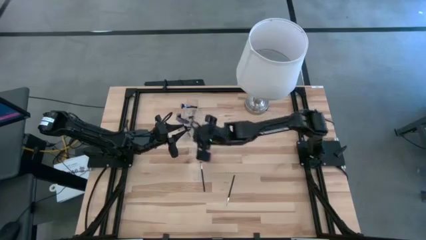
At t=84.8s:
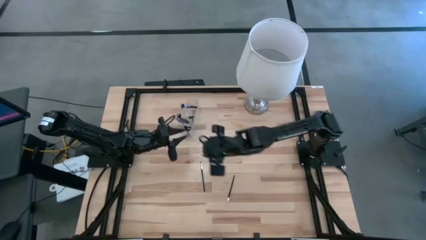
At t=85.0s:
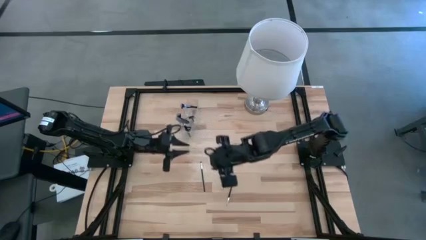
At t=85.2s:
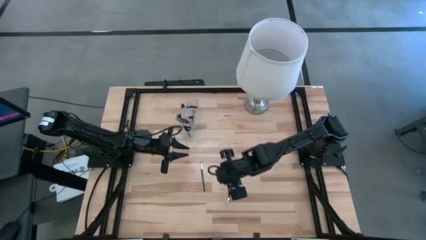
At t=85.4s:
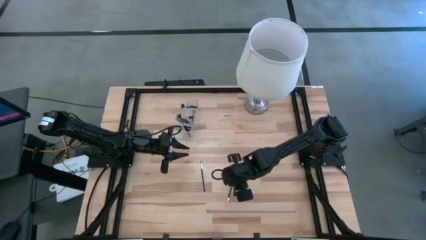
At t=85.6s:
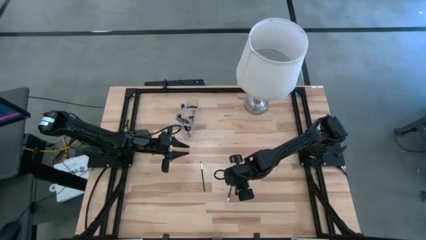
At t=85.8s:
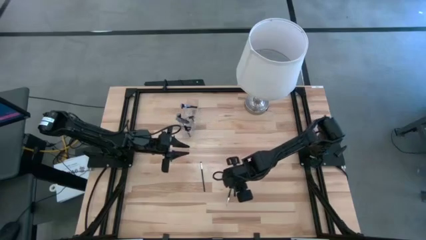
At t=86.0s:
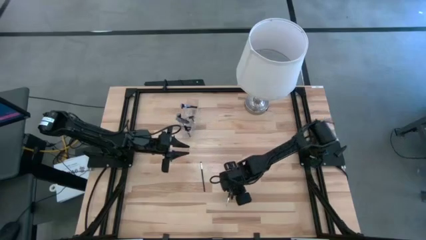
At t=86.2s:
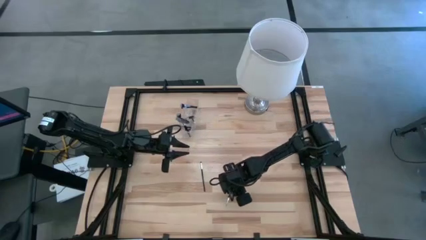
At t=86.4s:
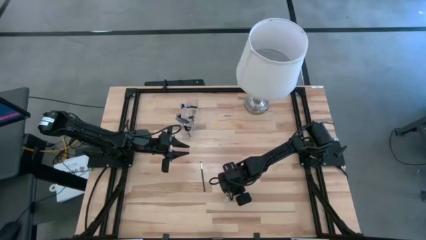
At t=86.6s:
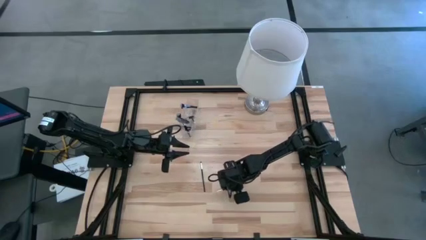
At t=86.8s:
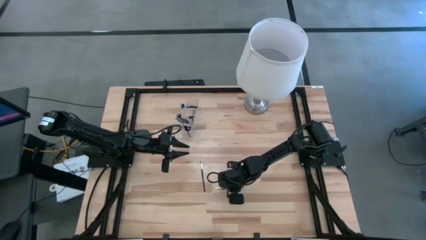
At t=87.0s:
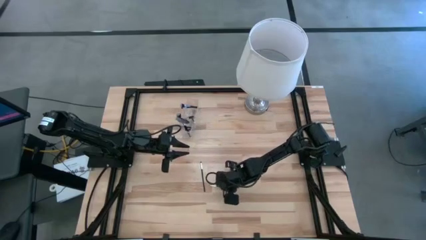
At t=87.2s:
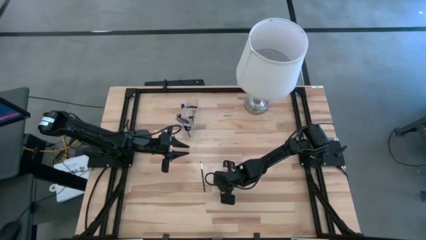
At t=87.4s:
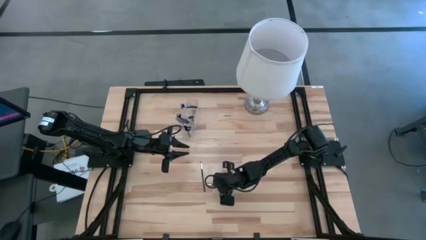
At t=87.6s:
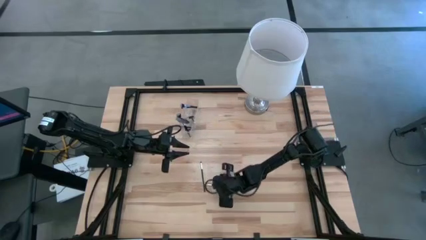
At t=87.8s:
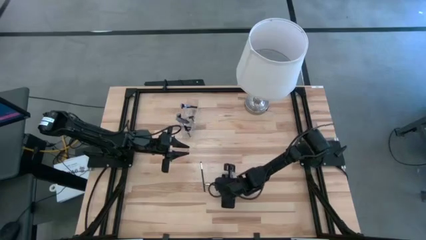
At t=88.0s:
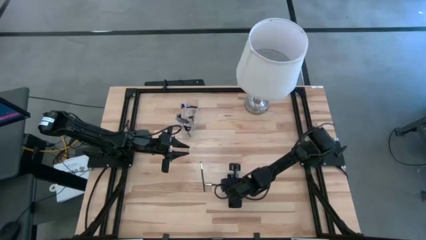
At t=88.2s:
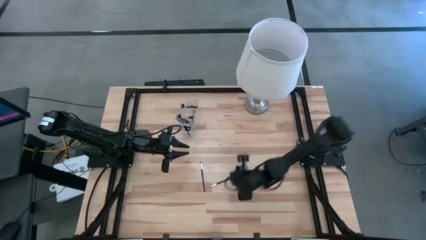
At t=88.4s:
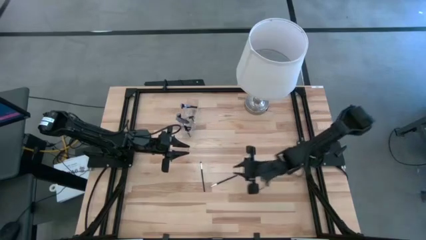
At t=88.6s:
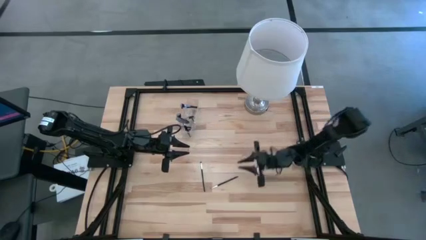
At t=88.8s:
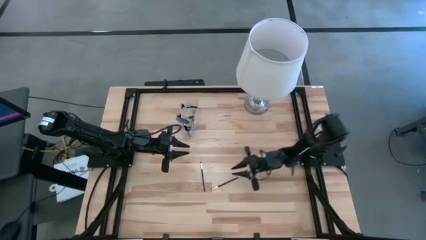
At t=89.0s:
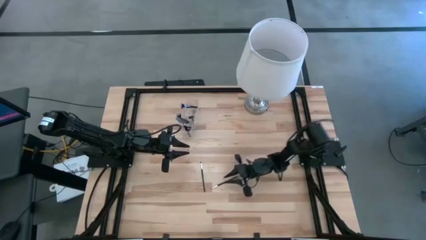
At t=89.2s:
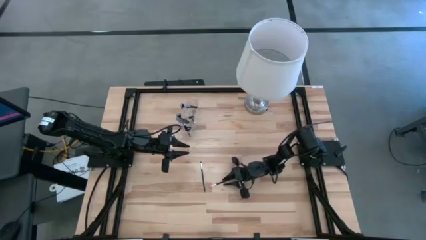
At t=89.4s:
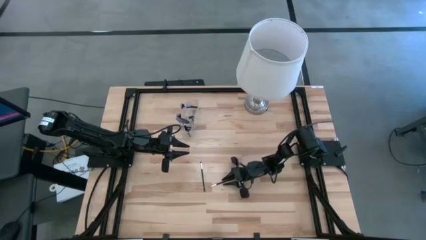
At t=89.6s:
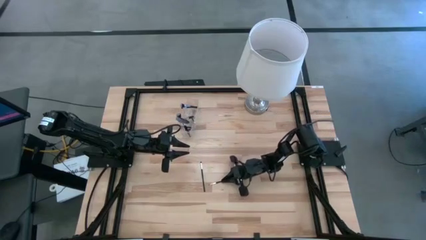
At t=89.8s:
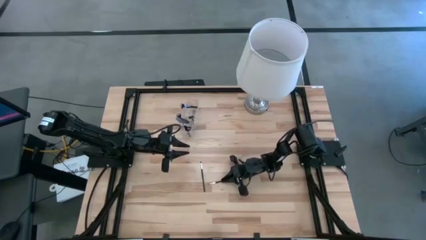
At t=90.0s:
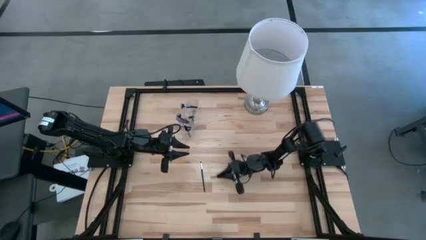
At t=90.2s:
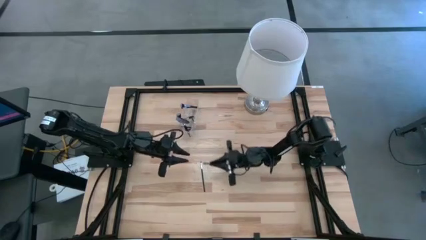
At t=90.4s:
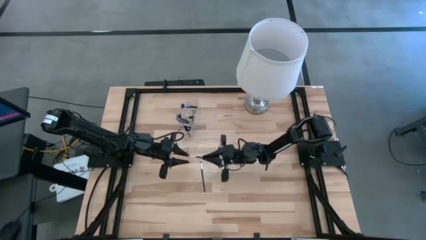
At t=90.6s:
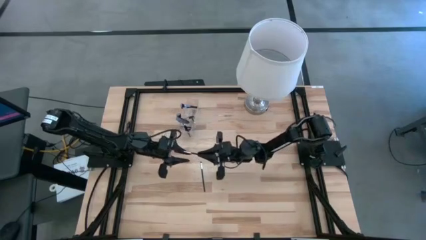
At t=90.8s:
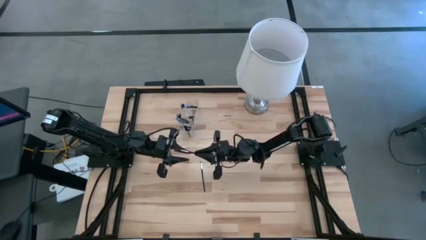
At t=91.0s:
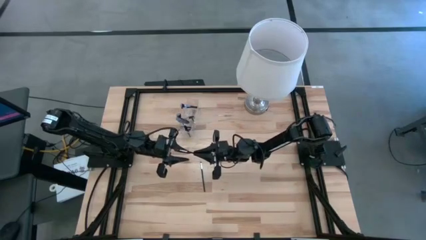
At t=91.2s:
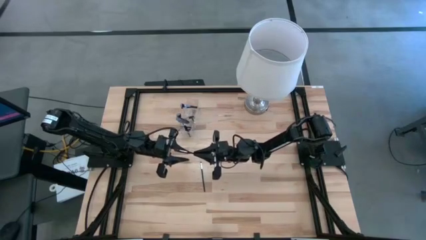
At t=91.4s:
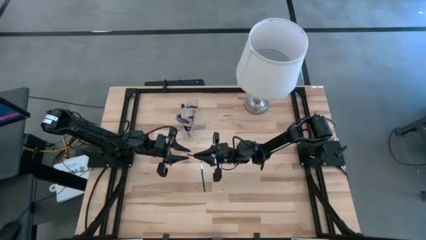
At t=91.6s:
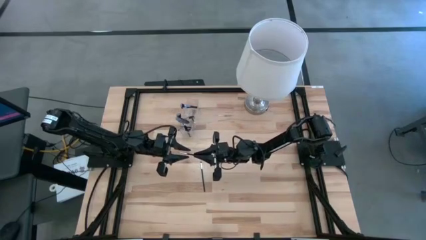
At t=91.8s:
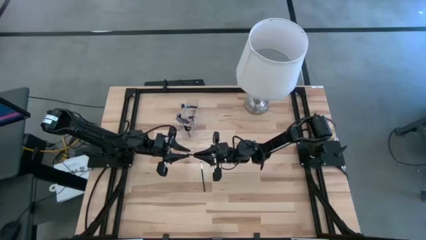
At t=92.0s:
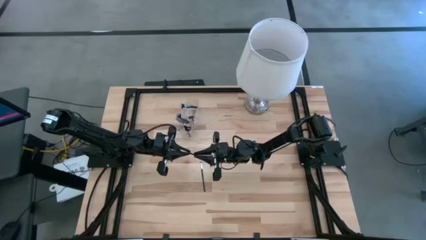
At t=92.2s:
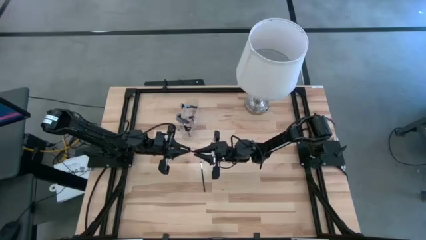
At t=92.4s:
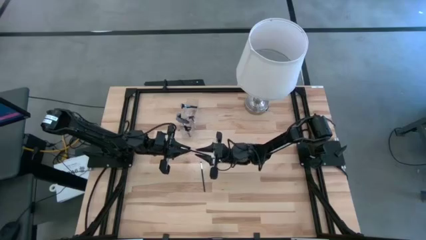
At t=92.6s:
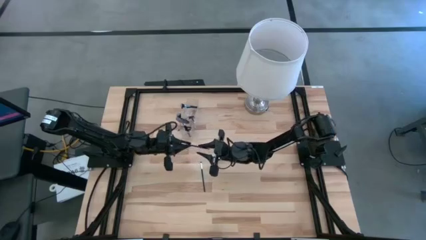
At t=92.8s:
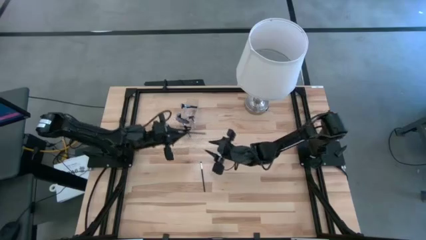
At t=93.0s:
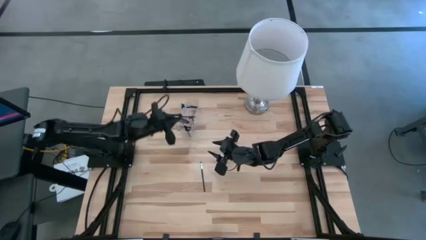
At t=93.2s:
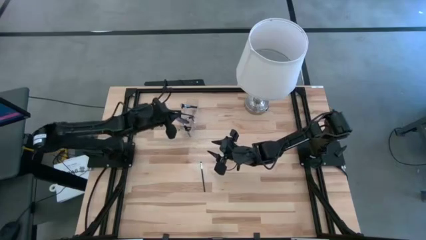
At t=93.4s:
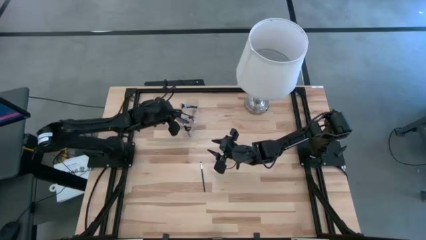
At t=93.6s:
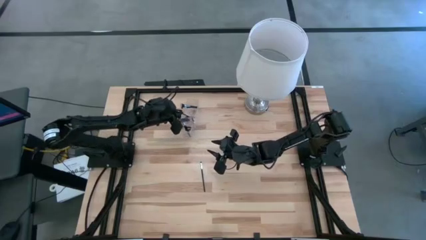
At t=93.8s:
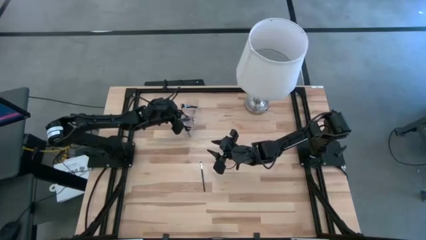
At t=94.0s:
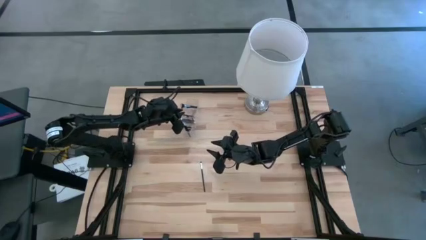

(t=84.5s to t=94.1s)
Task: Put items in baskets/containers
Put the liner brush into the center transparent organizer

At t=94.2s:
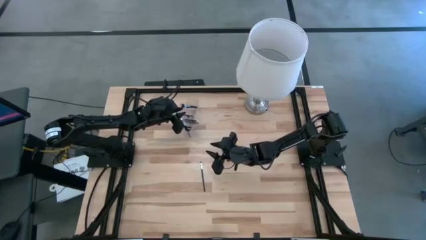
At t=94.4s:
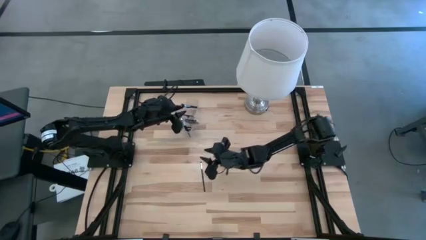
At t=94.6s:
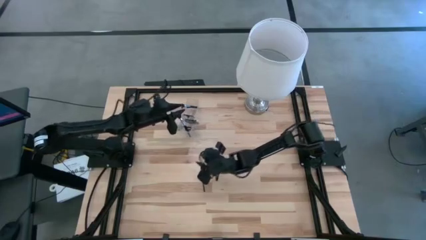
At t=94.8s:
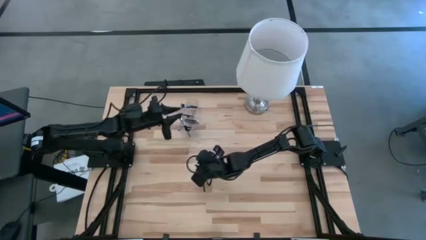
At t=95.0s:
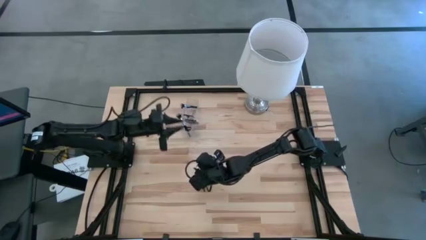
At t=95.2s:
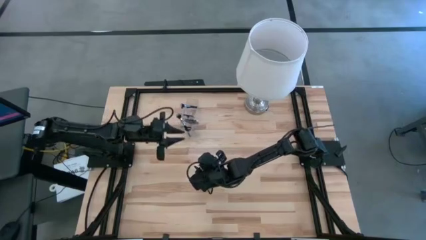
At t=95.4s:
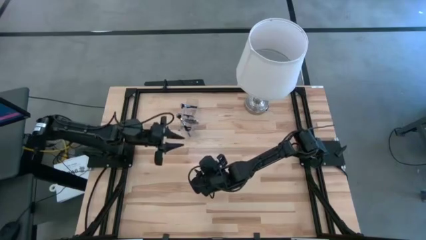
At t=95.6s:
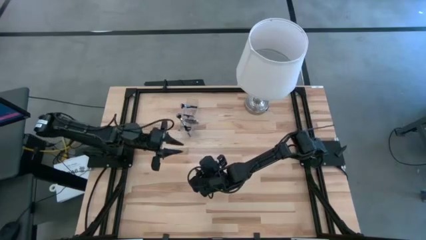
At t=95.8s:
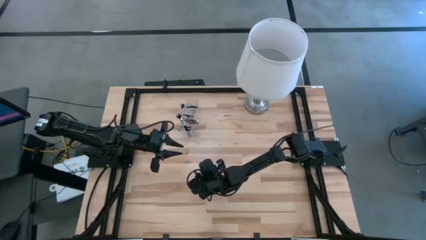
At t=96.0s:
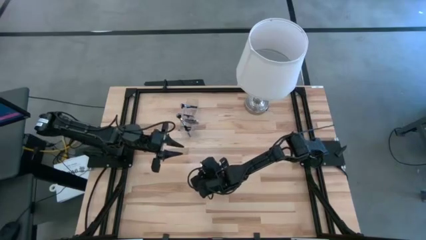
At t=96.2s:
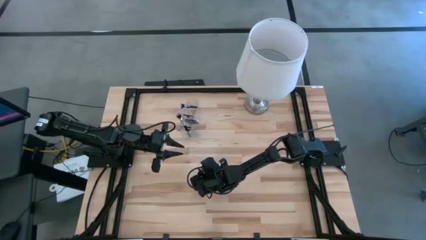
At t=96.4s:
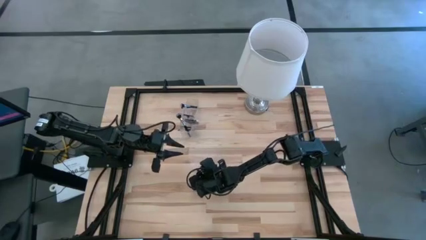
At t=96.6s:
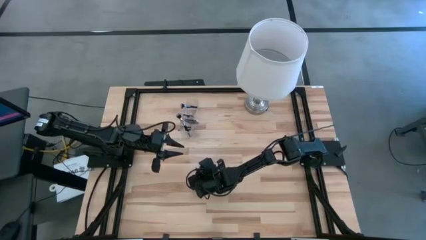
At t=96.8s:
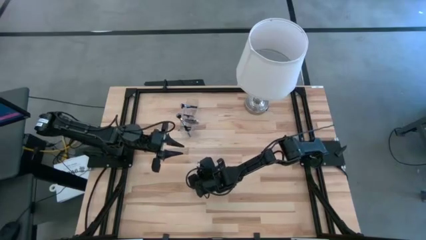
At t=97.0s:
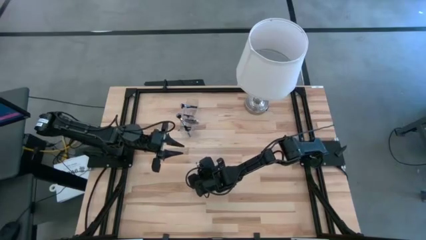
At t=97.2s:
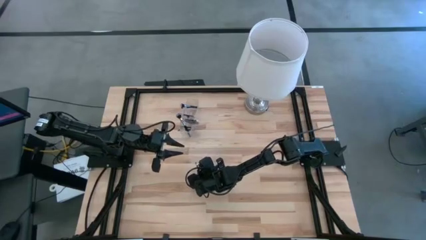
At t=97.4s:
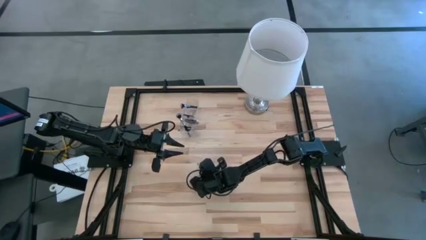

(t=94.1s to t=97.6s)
Put the eyeshadow brush into the right transparent organizer

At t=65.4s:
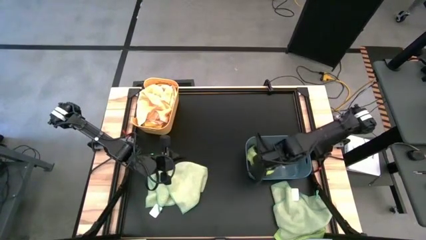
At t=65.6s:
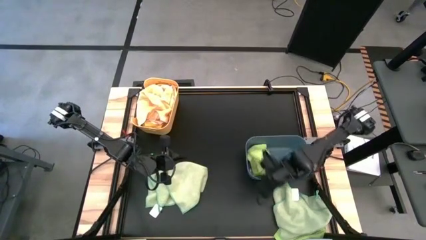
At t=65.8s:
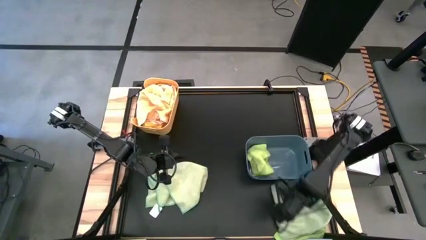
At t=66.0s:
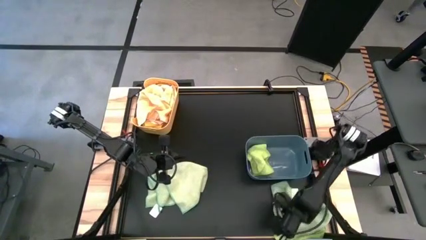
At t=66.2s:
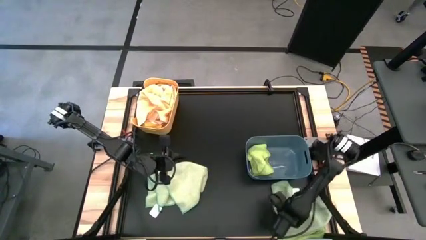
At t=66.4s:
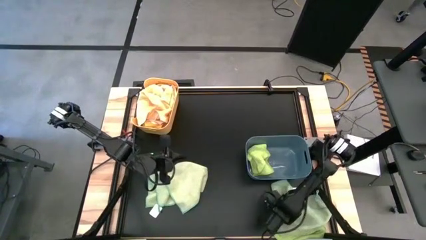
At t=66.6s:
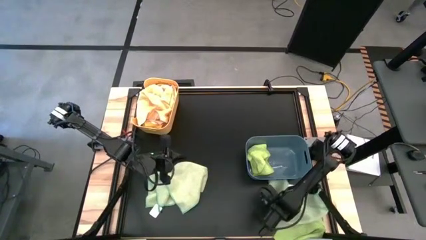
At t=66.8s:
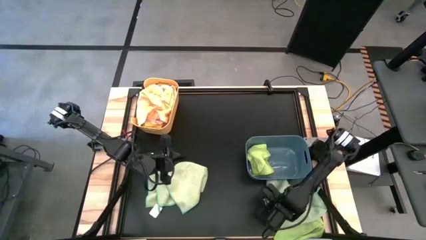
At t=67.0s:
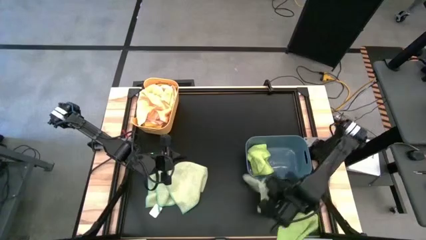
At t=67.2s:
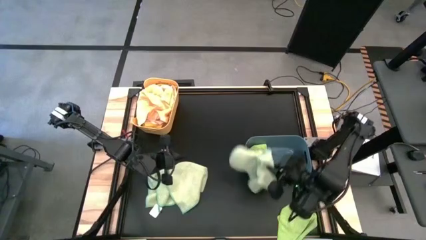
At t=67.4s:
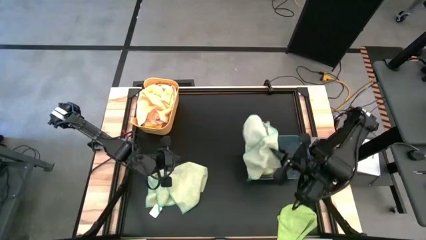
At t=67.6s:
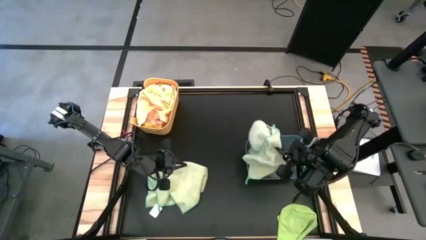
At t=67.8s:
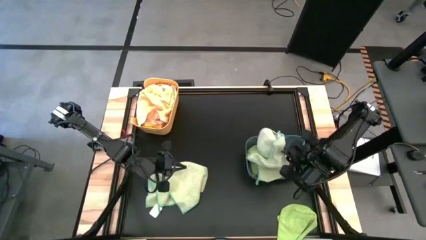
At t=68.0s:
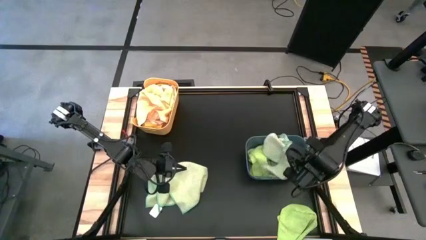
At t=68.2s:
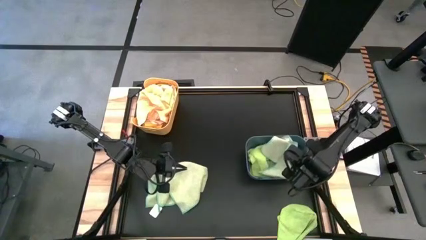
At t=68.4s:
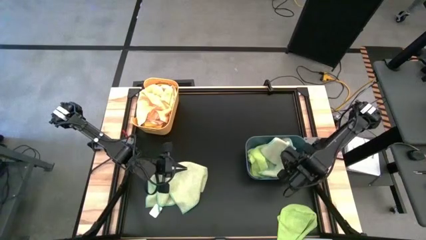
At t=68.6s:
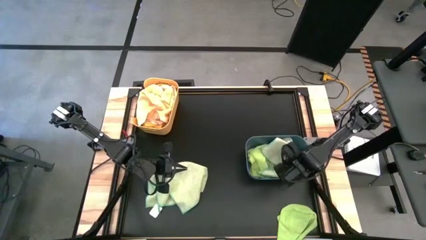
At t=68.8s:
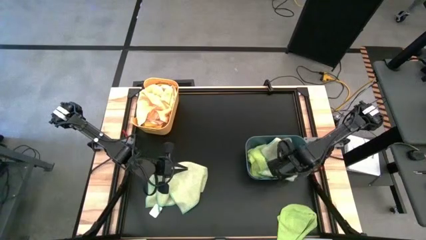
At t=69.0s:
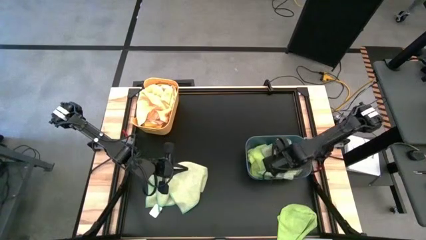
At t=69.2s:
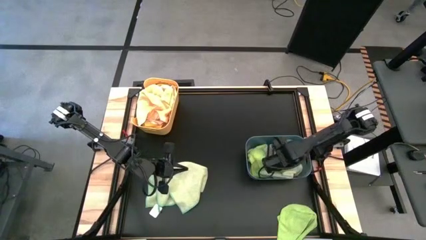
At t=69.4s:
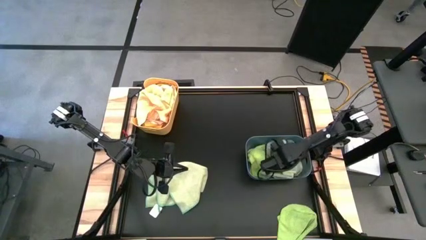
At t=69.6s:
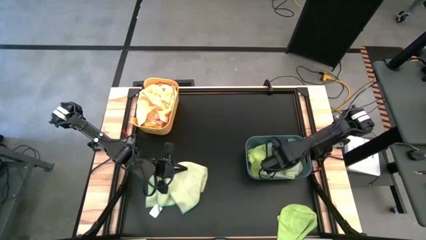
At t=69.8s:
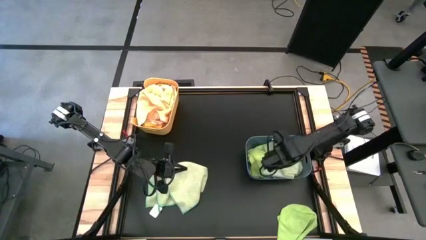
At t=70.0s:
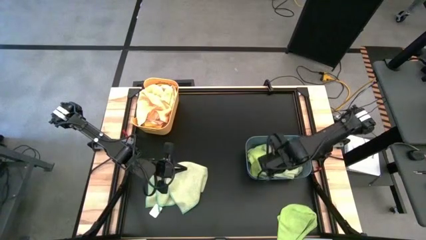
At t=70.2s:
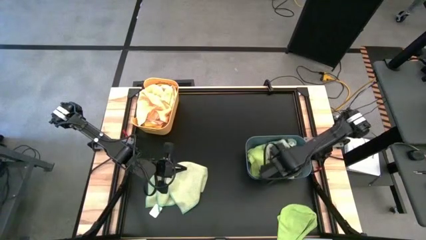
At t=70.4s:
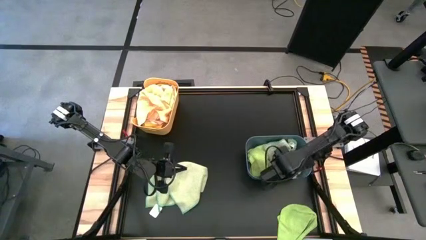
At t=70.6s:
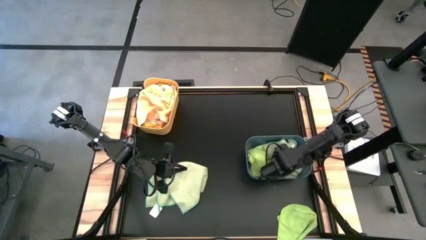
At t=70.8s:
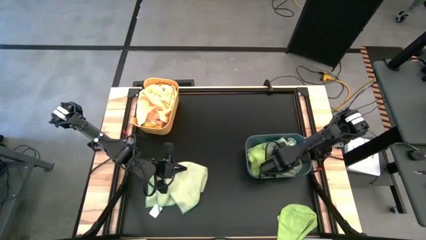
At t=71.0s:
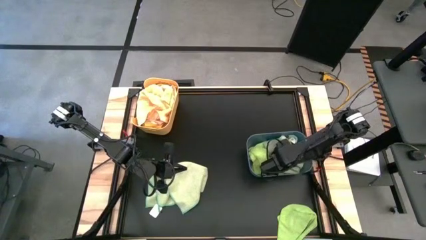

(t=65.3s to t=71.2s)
Task: Sort towels by color in basket
Put the bottom light green microfiber cloth into the blue bin
